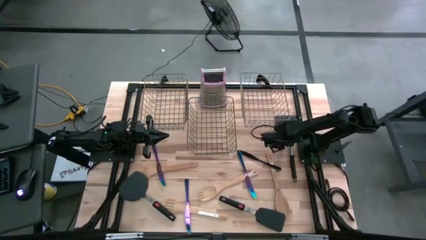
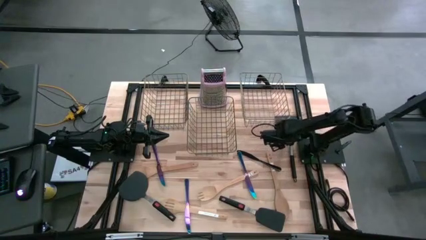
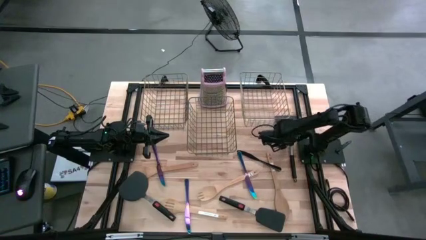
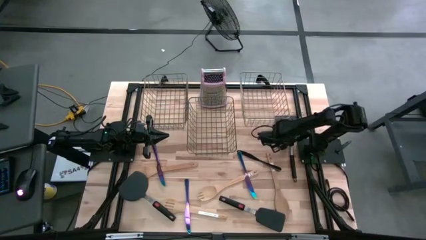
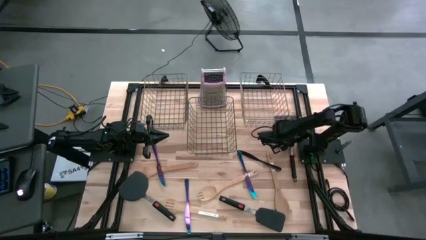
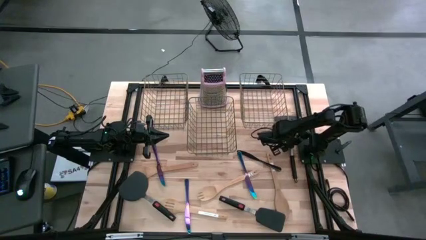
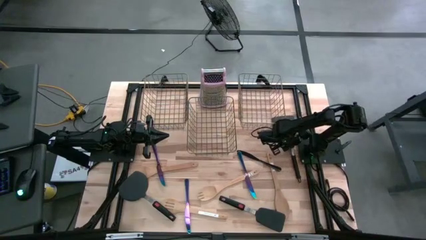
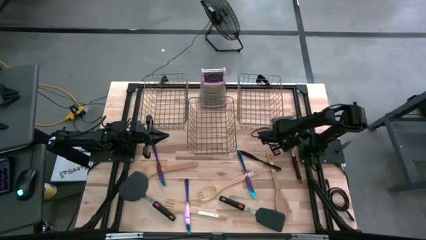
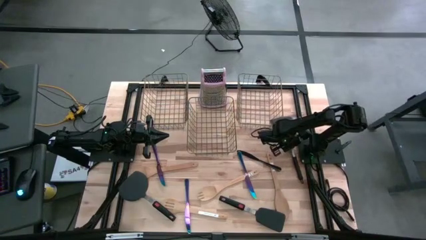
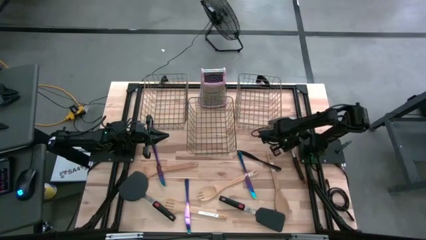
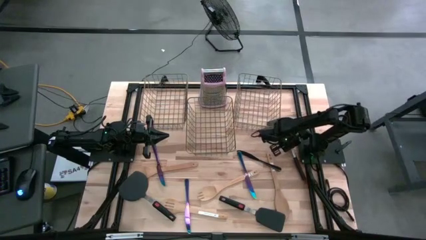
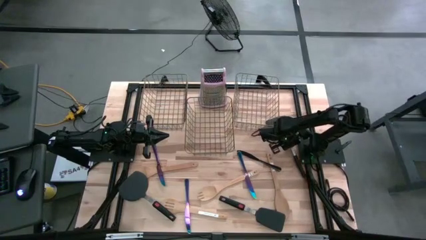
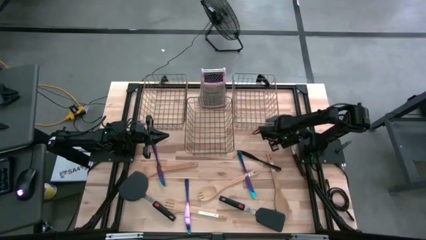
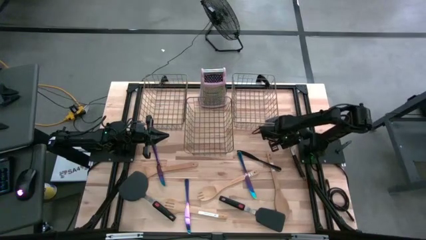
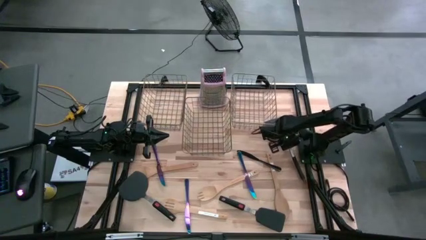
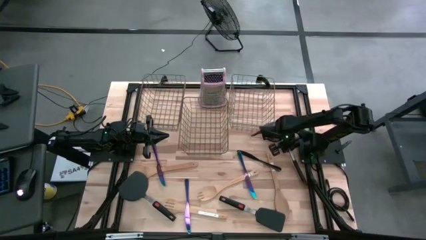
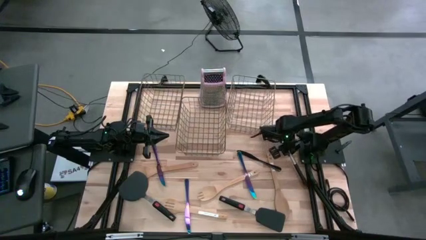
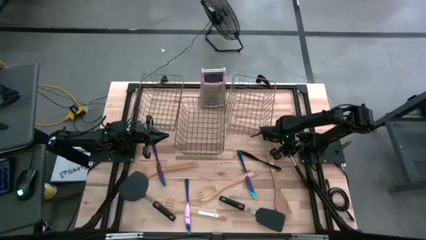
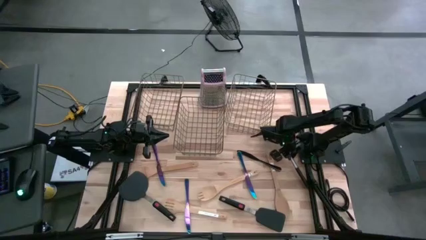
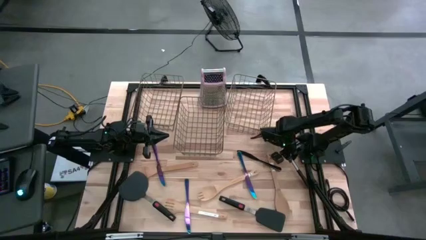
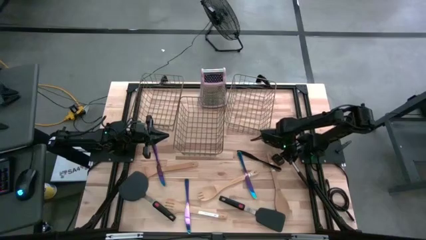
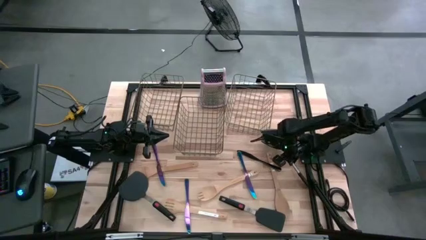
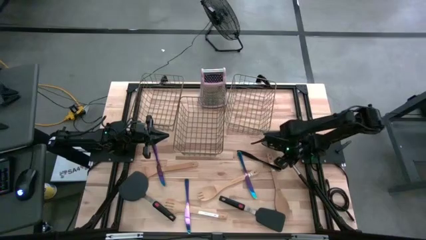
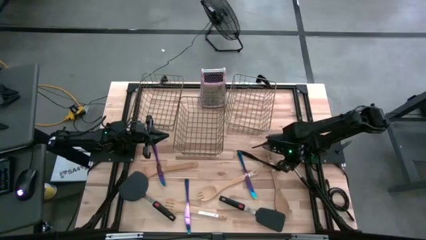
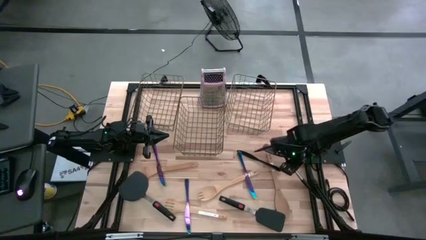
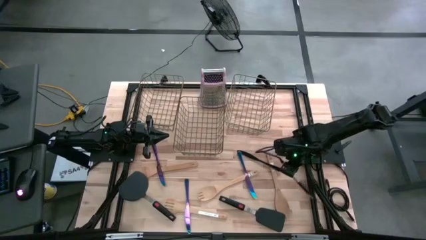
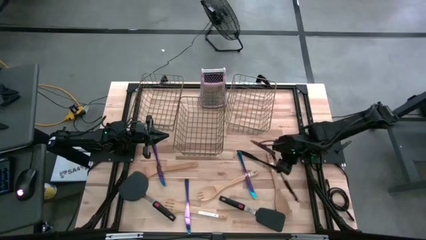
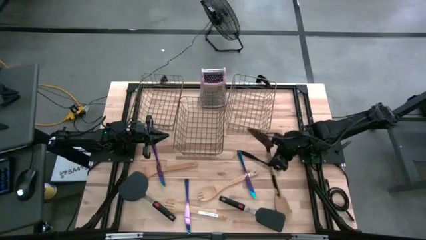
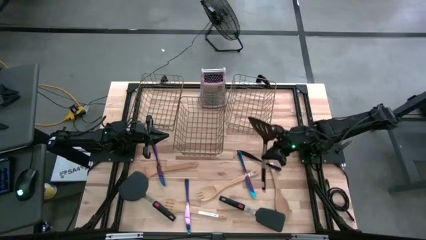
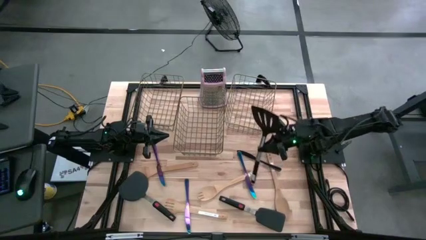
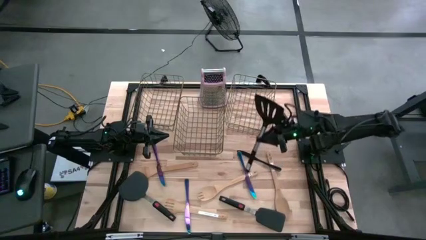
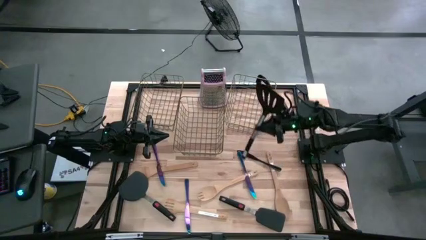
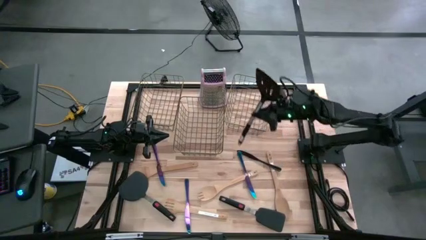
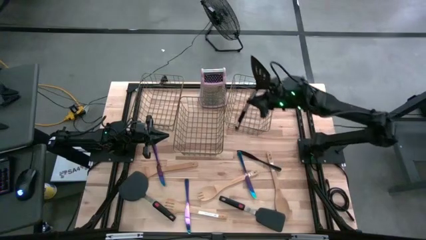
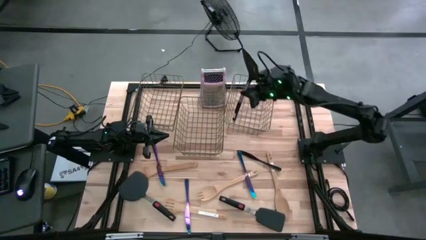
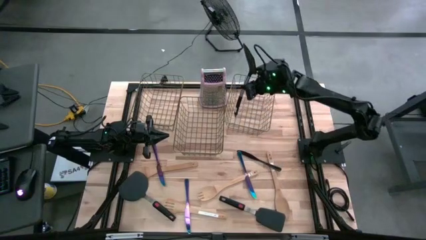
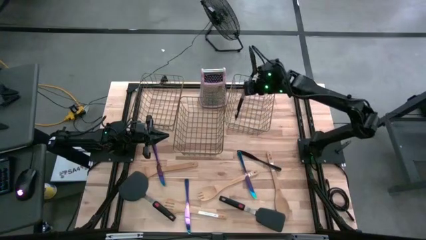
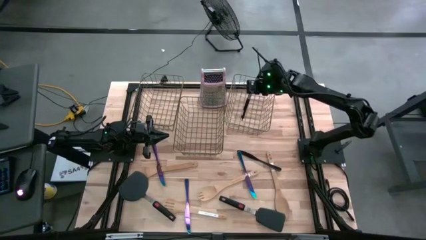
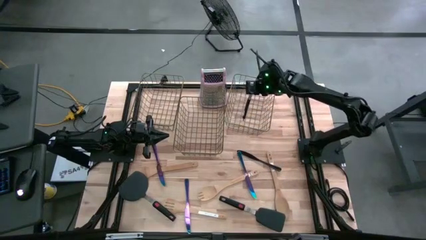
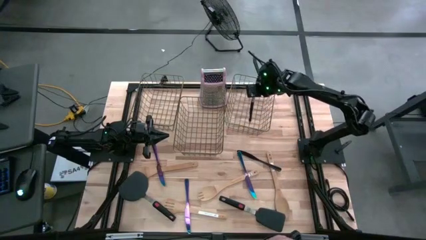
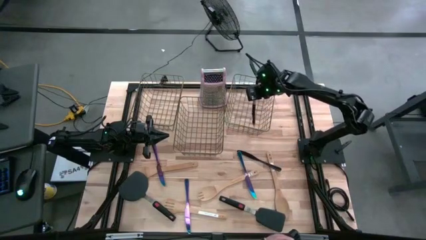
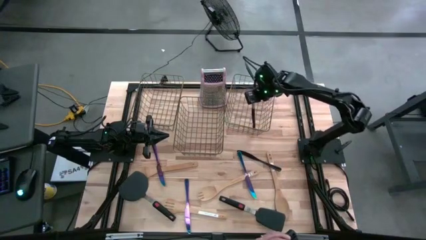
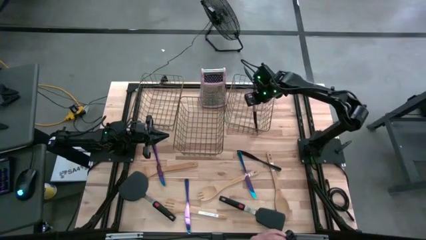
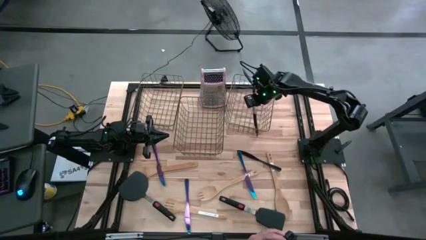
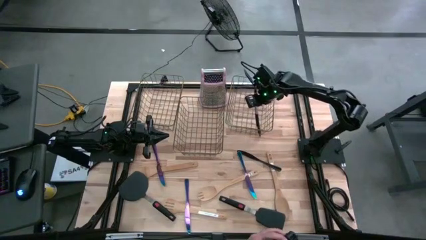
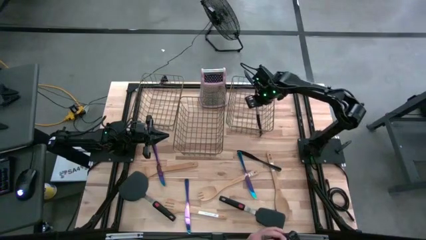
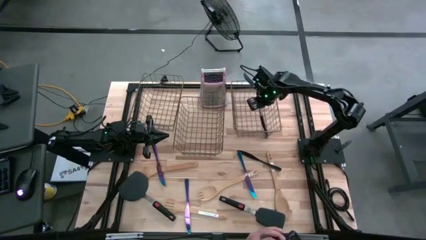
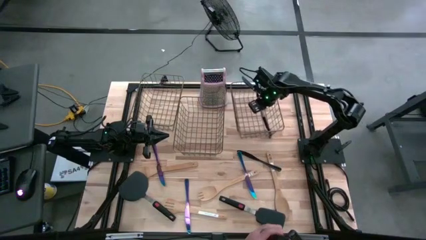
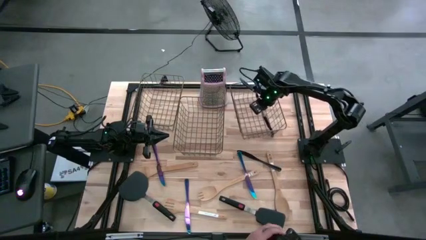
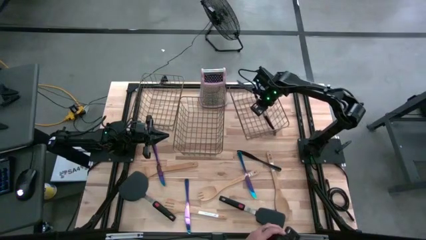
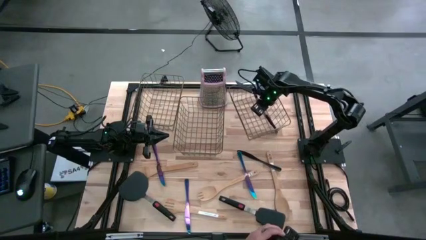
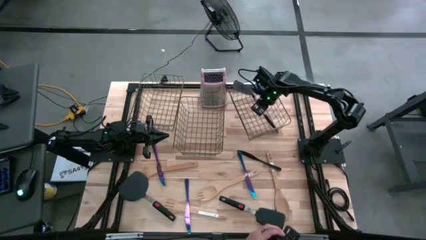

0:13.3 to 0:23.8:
Task: Pick & Place Kitchen Items
Put the top black spatula into the right wire basket

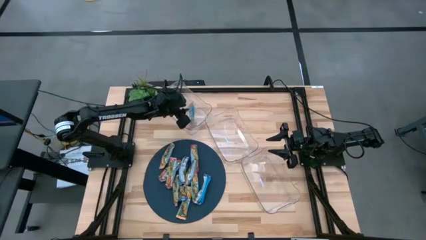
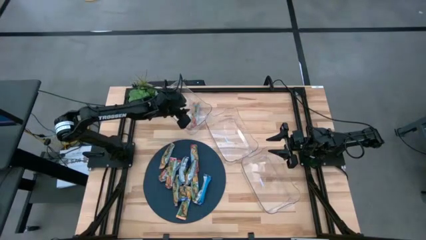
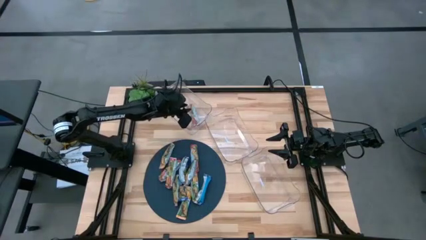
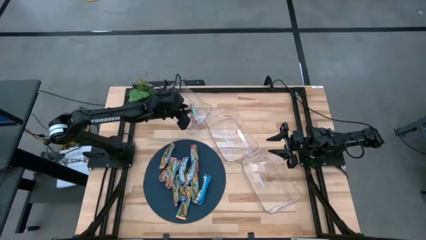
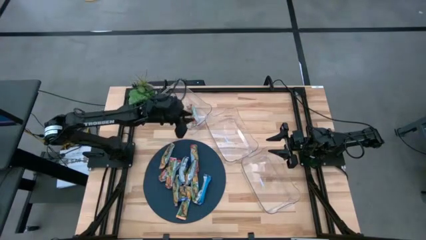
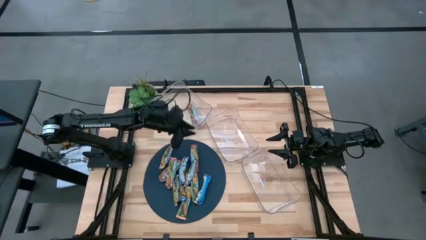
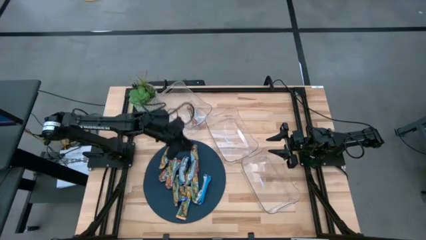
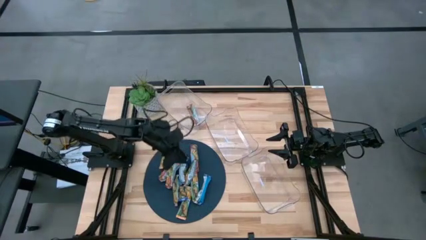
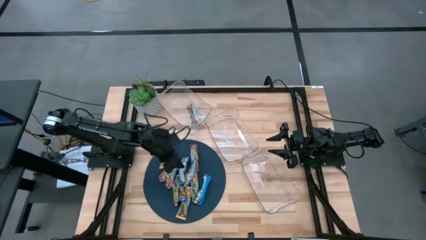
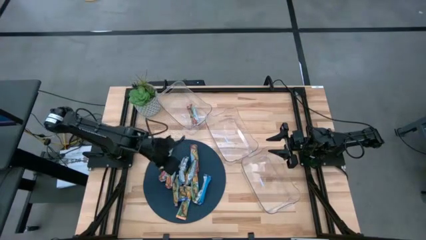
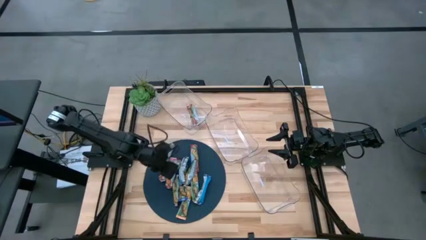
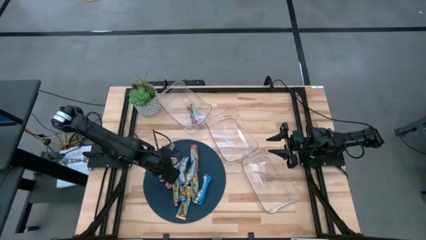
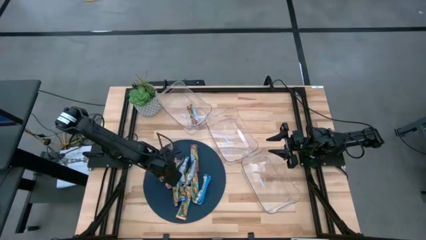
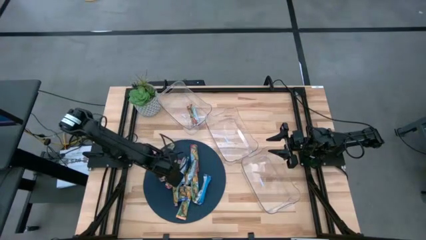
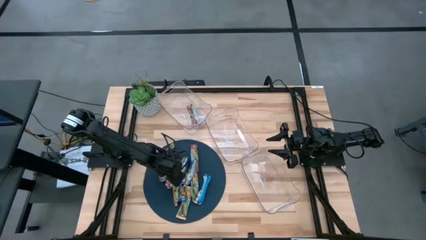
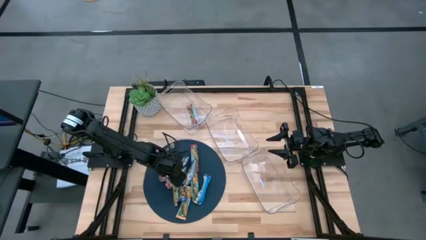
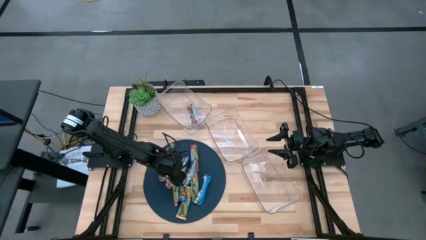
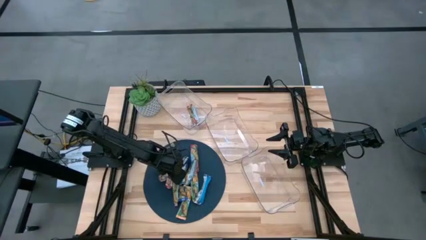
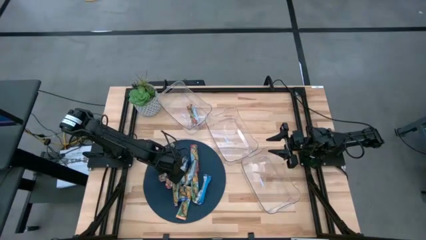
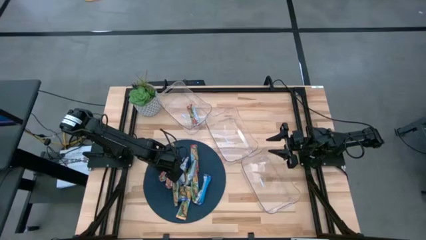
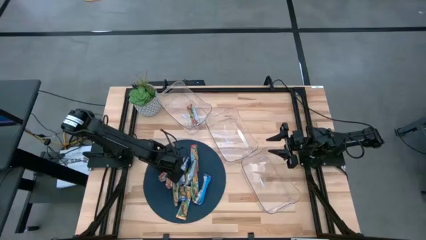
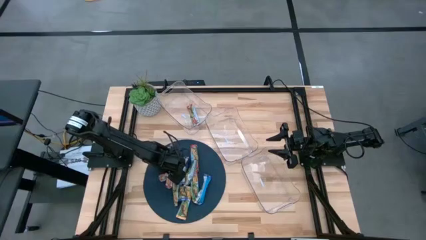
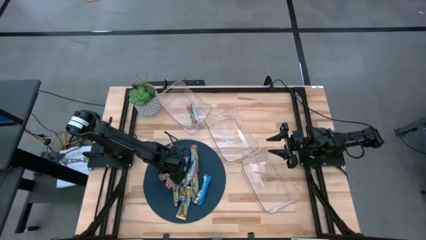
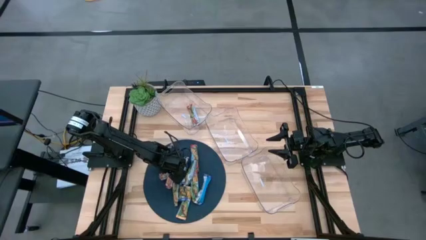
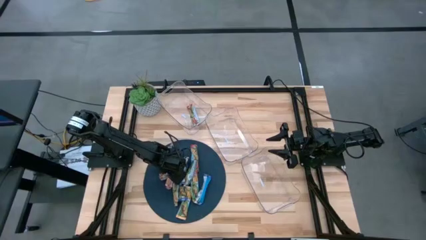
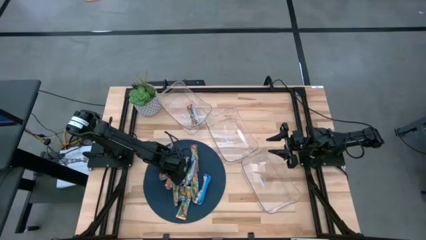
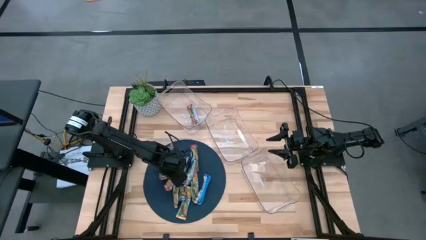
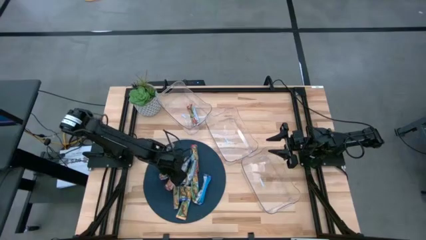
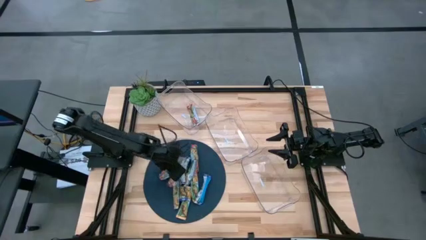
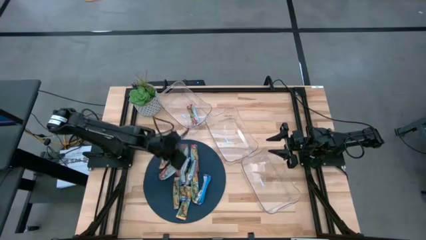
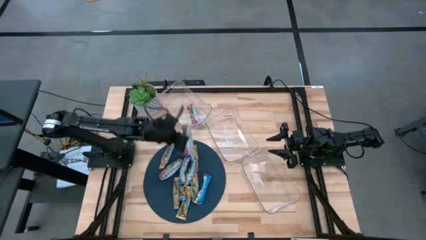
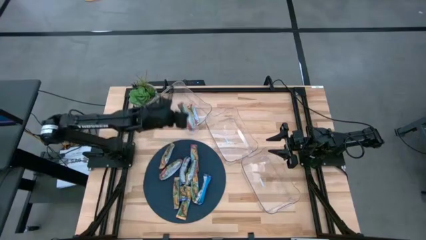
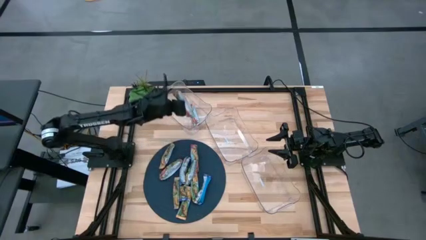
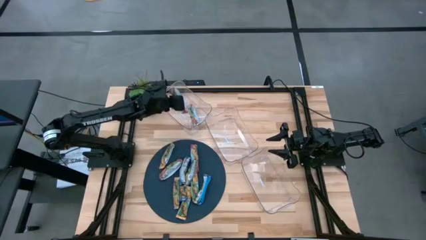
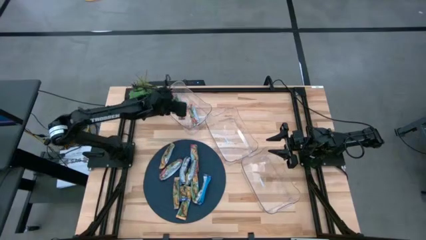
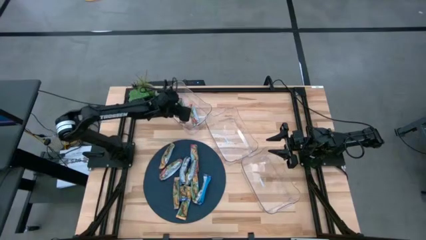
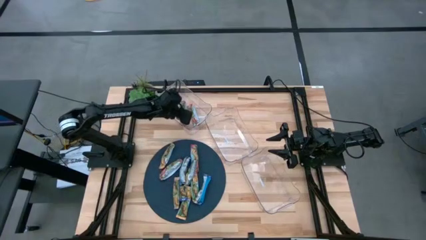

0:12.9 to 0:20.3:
Task: Pick and place Granola Bars by type
Put the red granola bar into the top transparent bin
